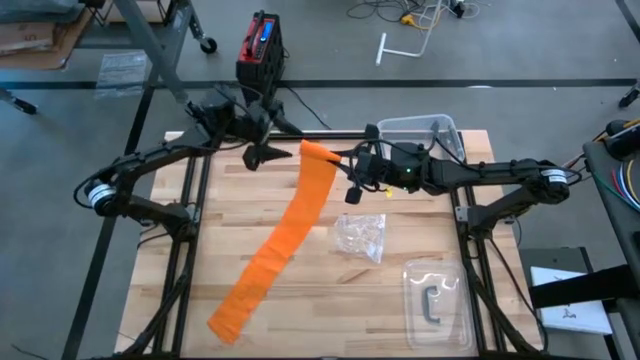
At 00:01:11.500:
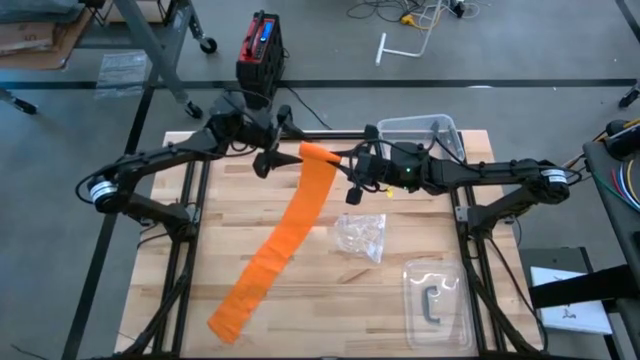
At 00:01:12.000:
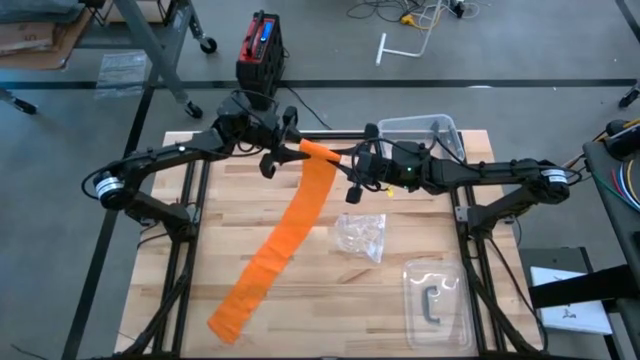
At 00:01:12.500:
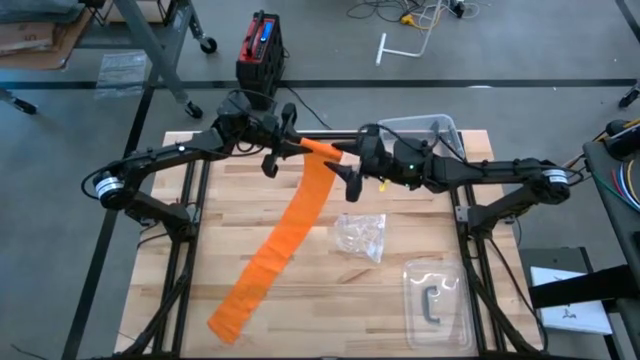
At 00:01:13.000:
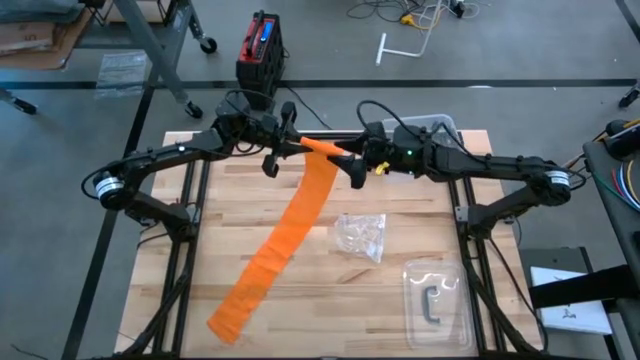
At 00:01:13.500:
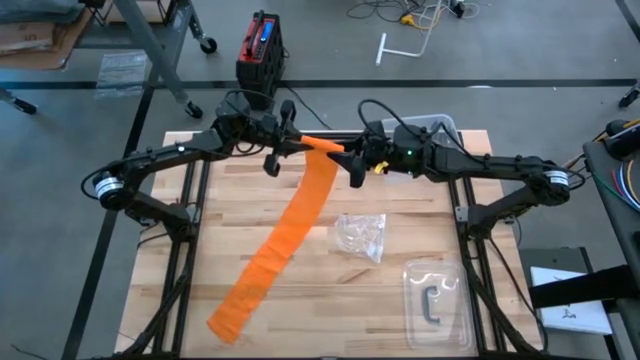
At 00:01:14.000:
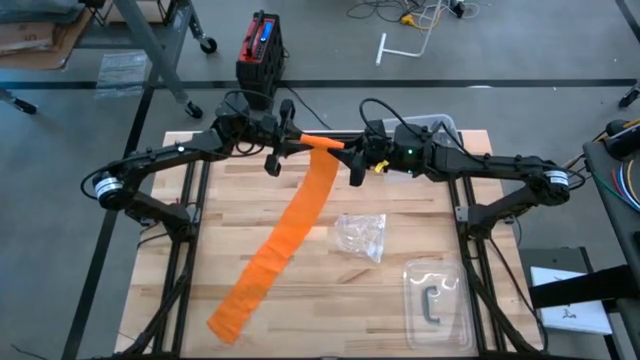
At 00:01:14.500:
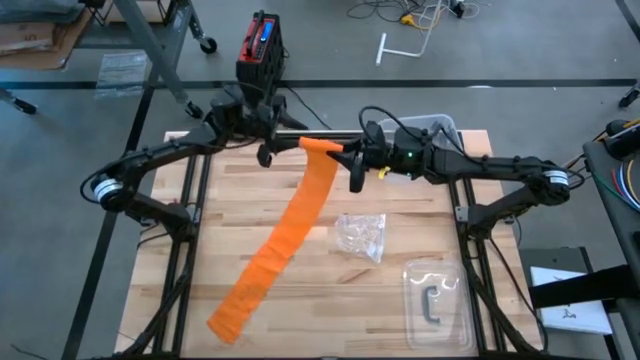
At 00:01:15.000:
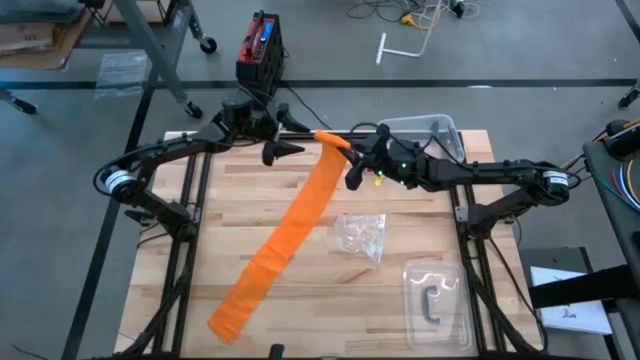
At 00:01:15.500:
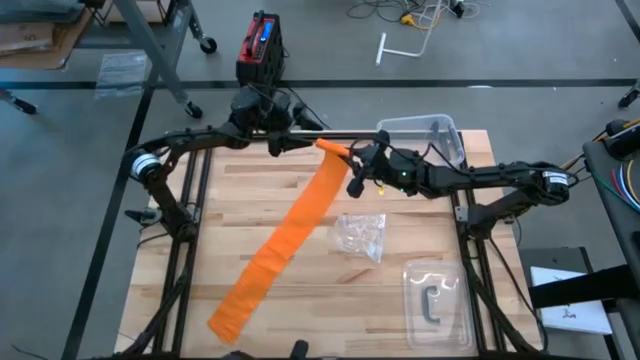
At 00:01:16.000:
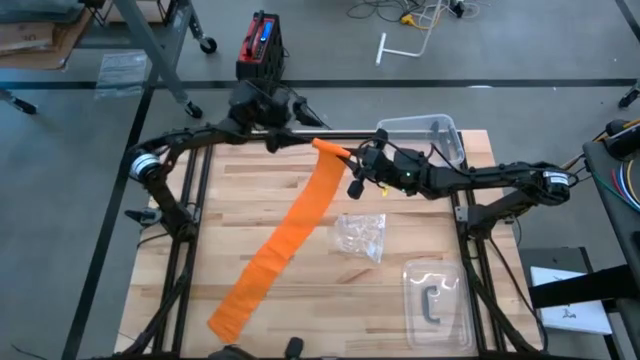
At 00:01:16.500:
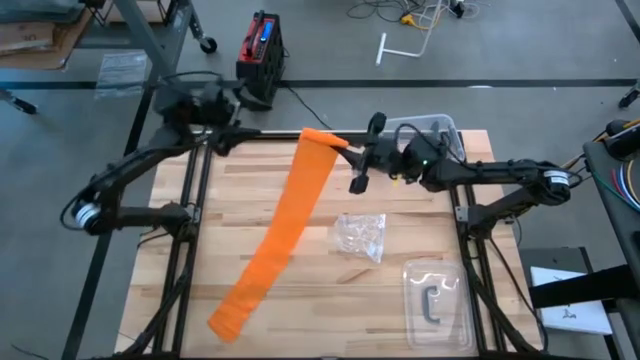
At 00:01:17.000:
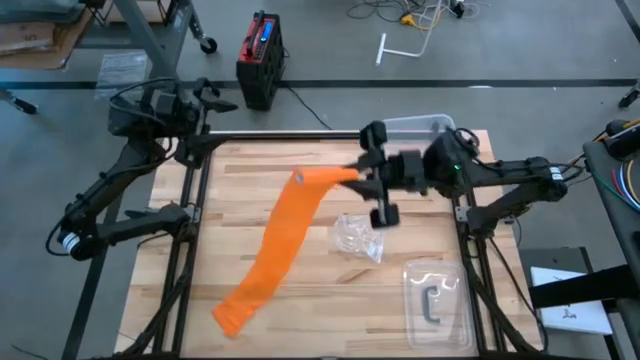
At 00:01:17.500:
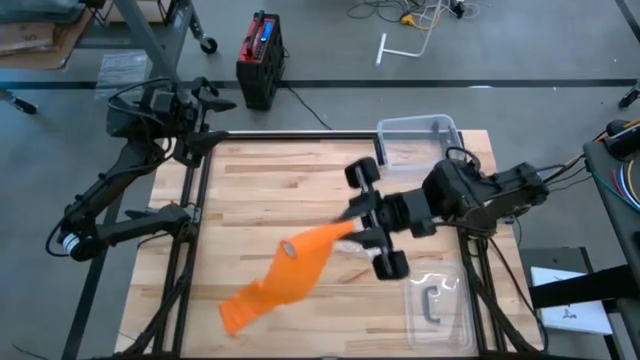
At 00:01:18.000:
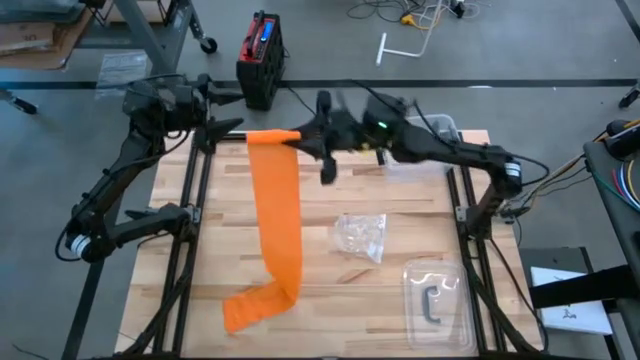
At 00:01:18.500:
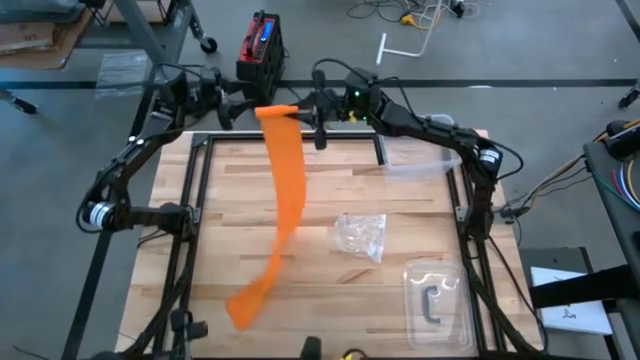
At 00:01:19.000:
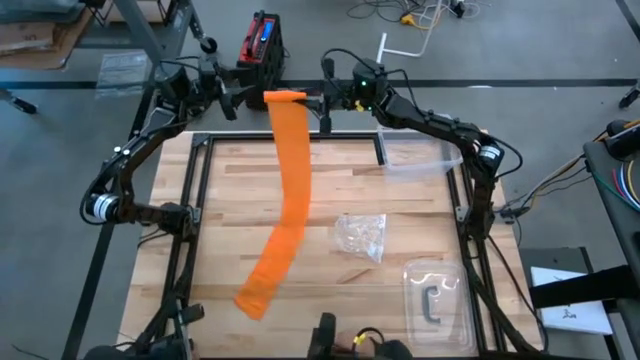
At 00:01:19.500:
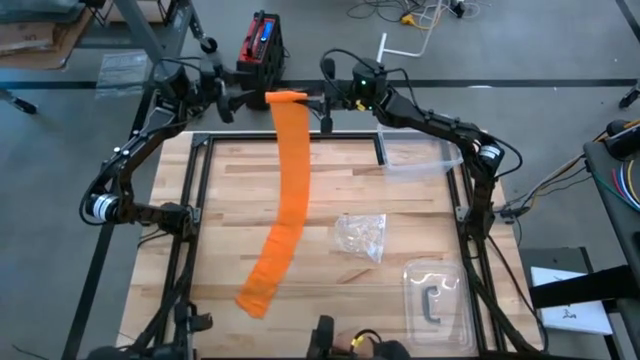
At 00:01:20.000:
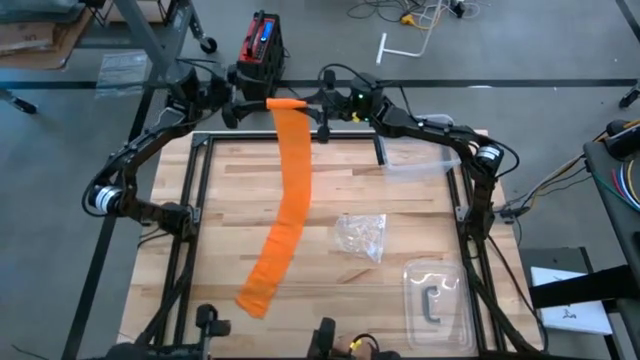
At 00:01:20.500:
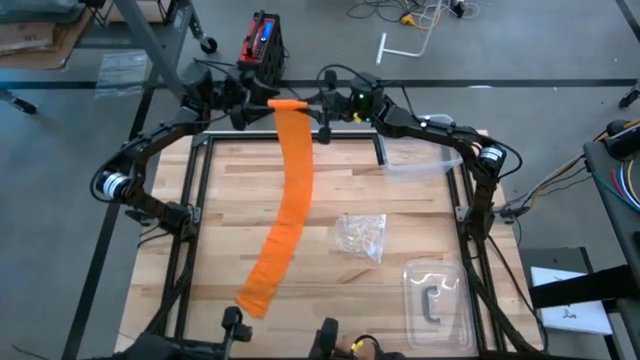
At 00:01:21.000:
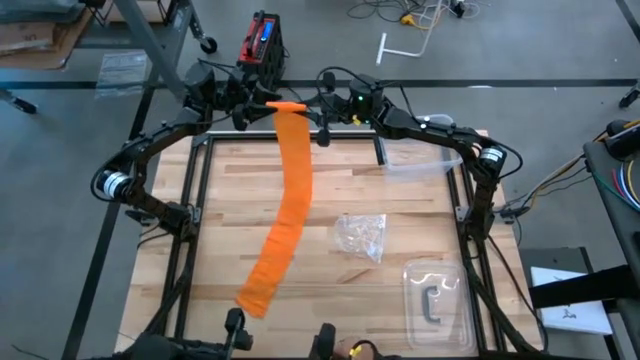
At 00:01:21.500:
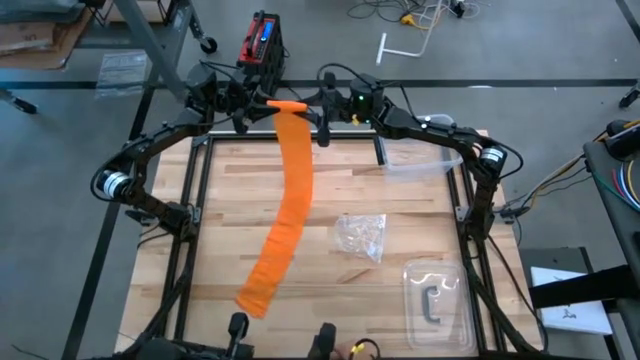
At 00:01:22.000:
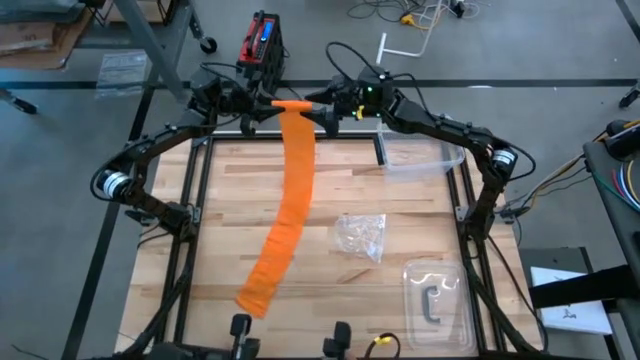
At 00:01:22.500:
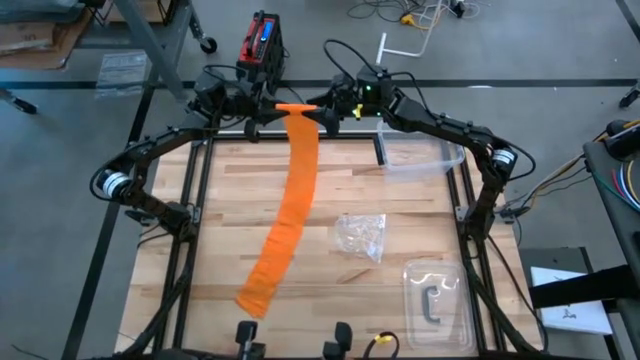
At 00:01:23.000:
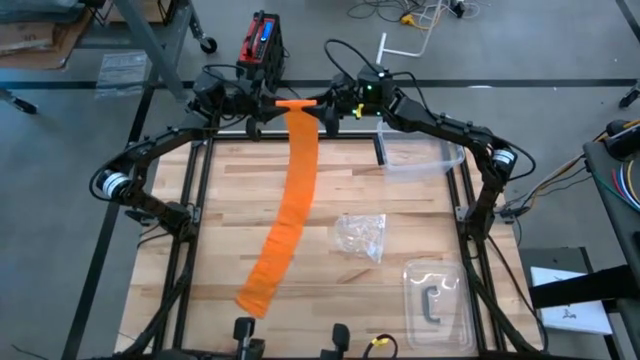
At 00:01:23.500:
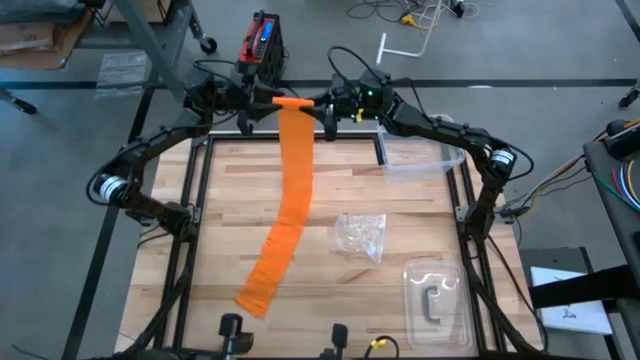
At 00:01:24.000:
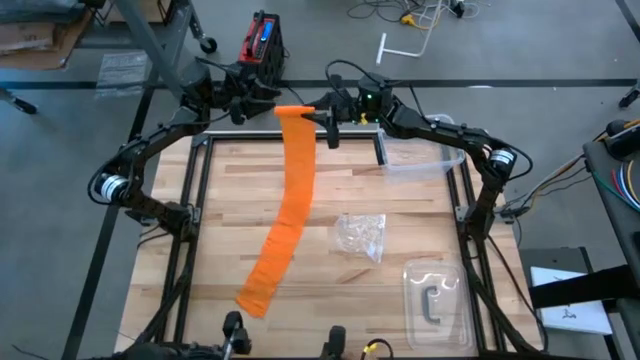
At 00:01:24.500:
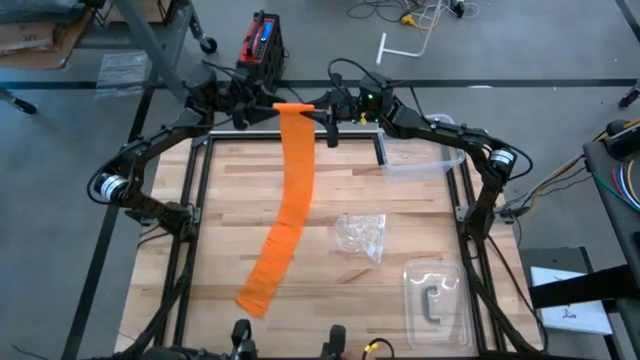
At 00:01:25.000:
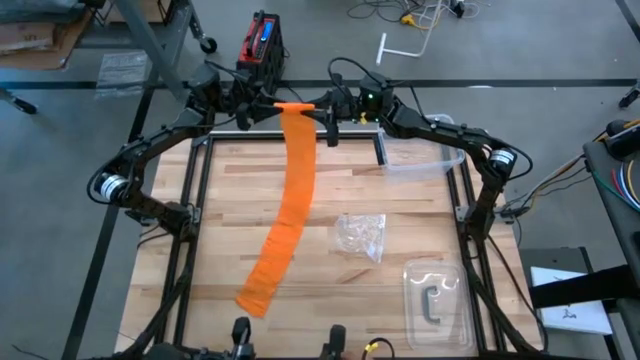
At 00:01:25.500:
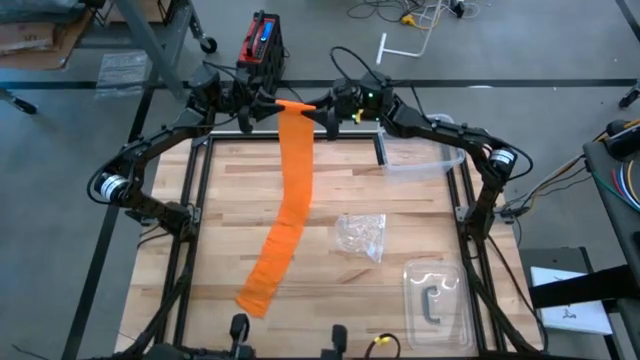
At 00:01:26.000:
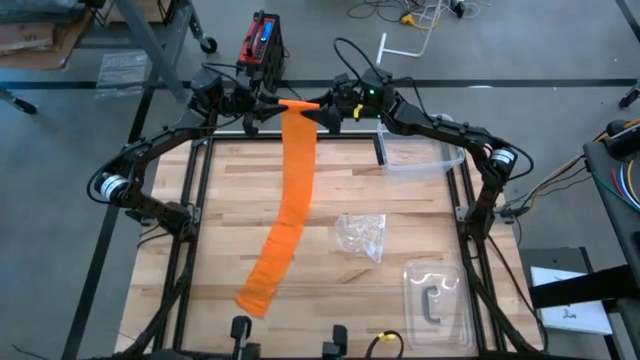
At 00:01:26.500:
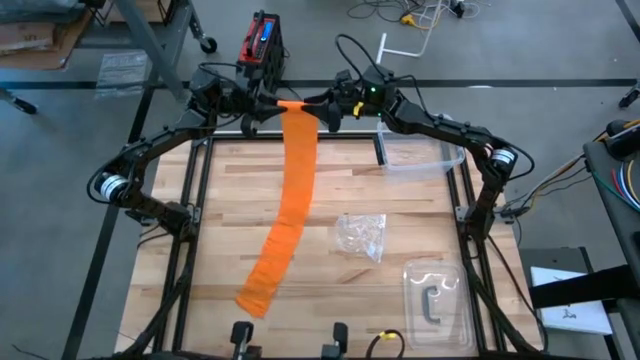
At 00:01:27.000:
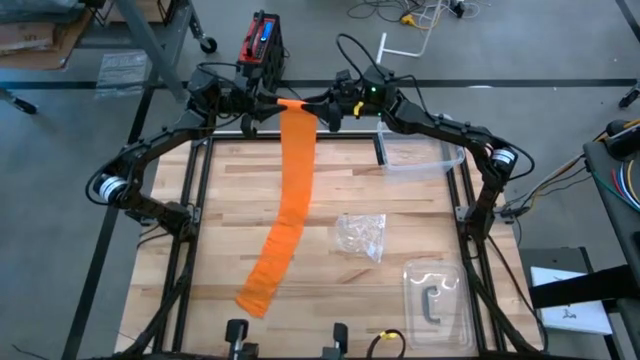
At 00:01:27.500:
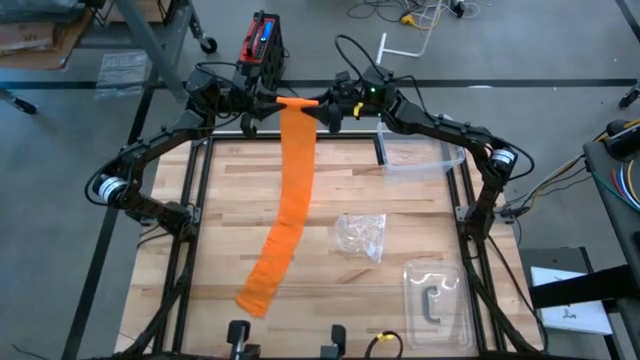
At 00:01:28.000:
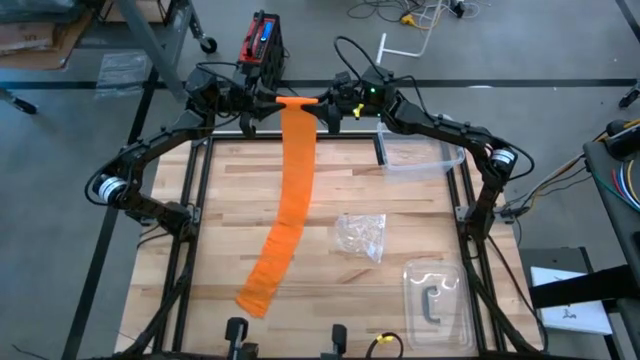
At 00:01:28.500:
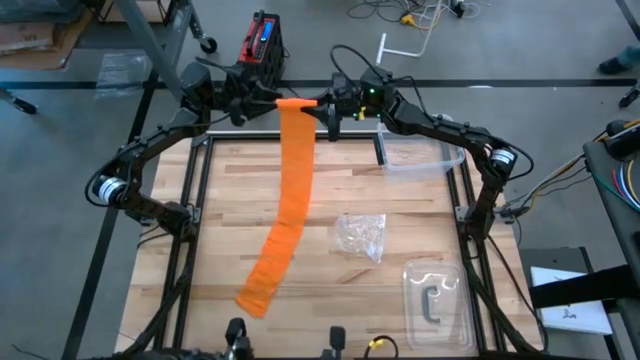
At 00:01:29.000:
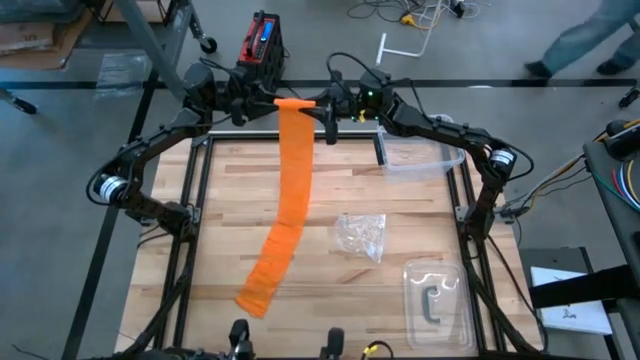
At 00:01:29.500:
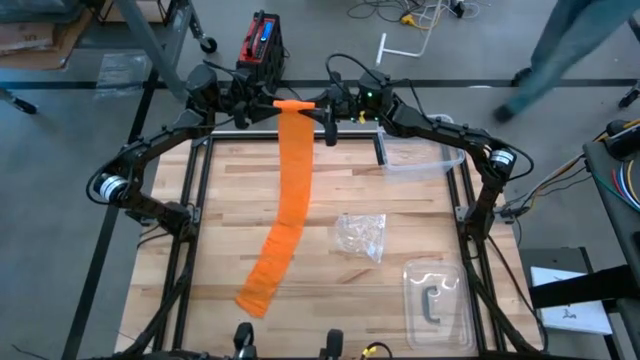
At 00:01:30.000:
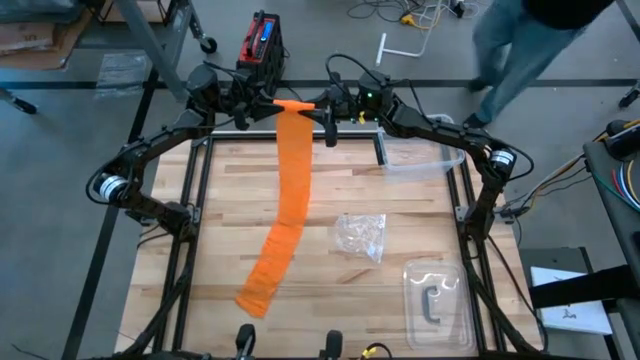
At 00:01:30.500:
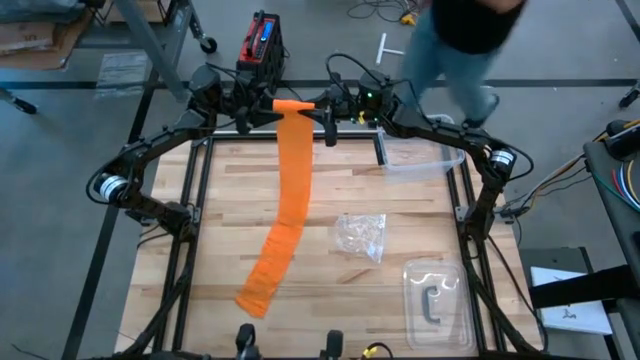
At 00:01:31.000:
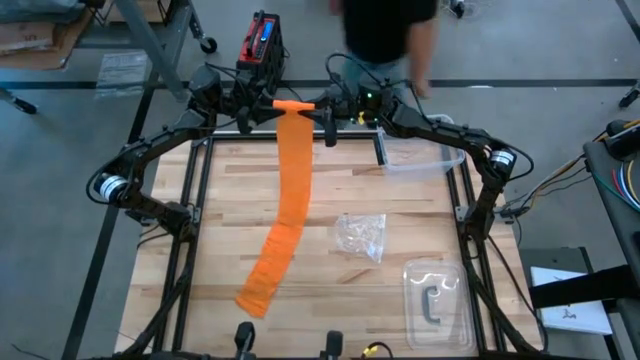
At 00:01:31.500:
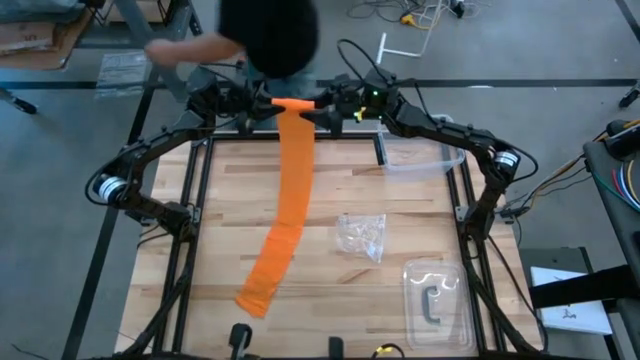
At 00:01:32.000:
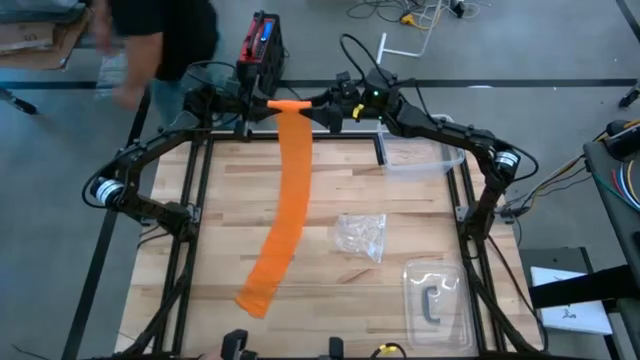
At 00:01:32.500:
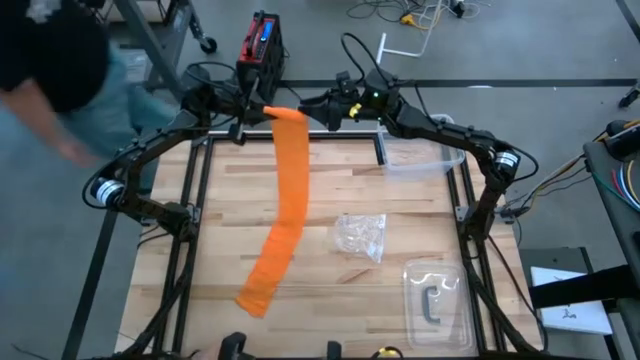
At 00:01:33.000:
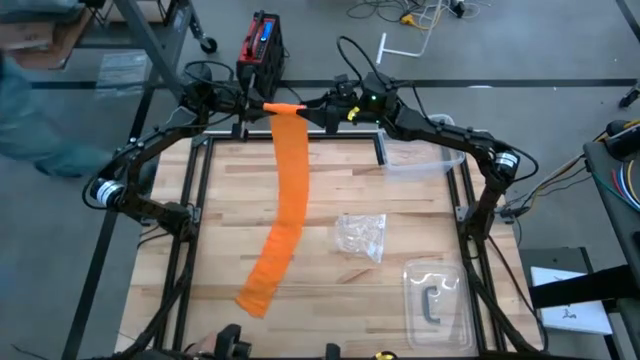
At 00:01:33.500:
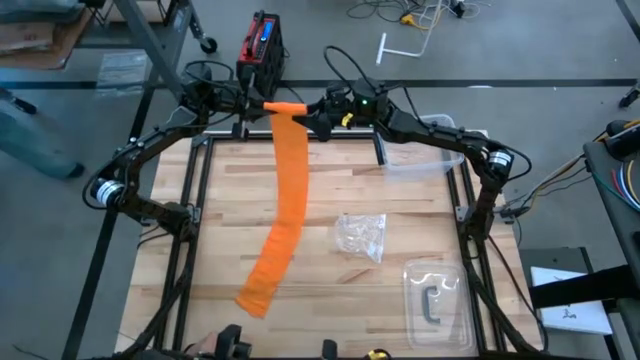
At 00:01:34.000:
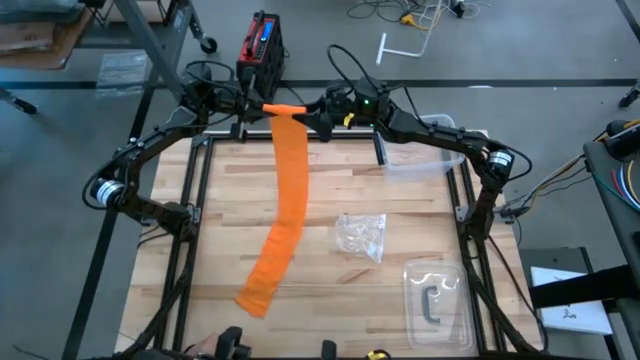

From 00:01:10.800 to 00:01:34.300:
Task: Roll bandage
Roll the orange bandage
